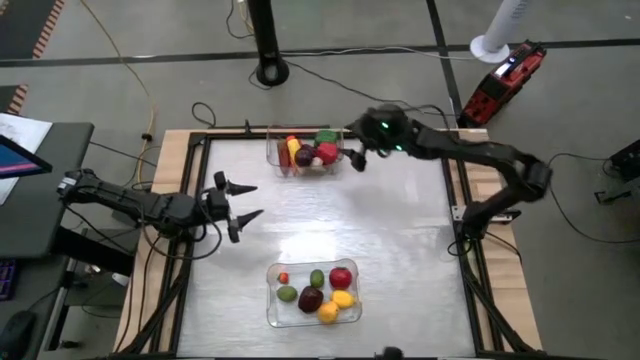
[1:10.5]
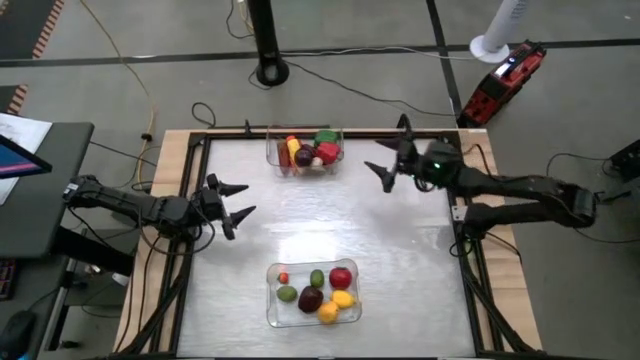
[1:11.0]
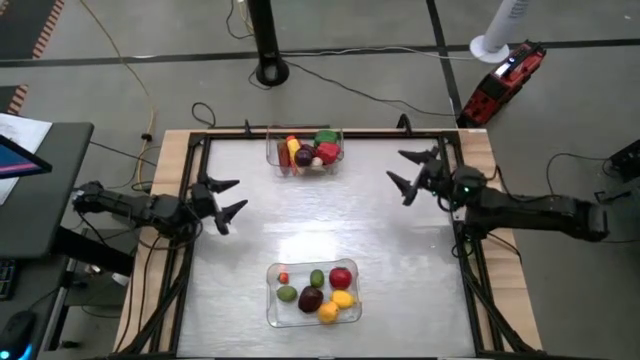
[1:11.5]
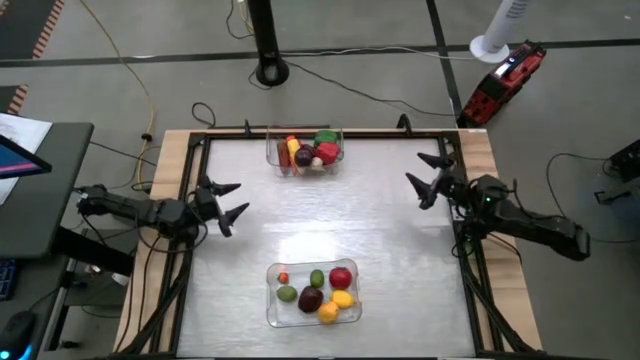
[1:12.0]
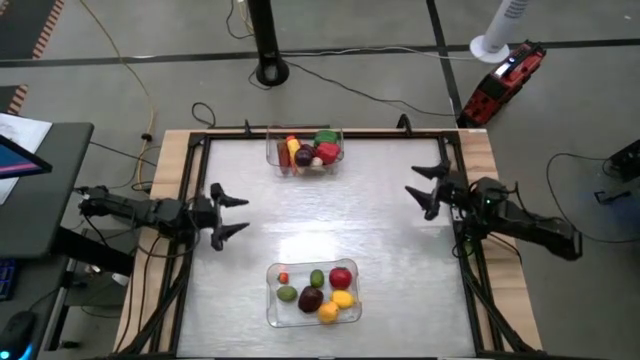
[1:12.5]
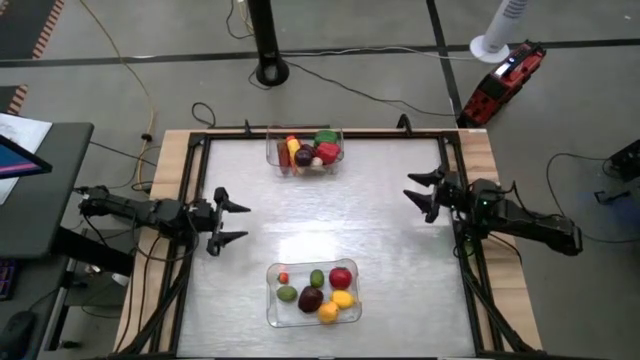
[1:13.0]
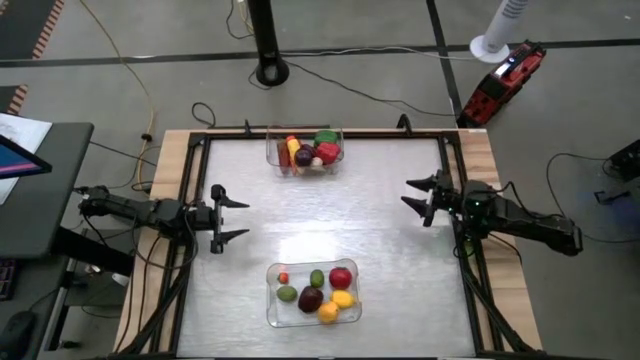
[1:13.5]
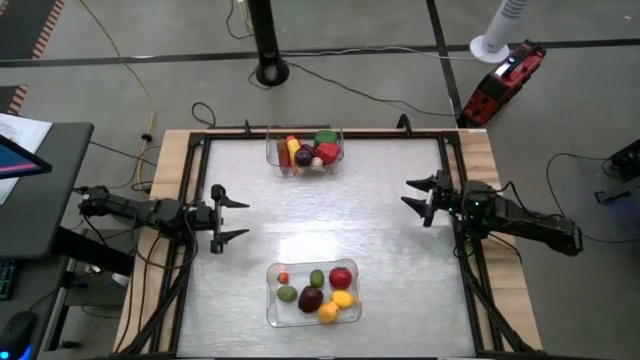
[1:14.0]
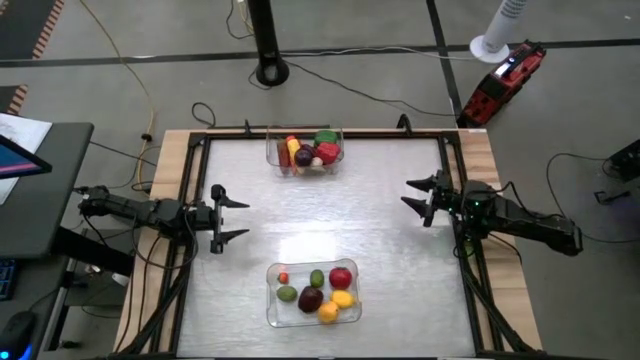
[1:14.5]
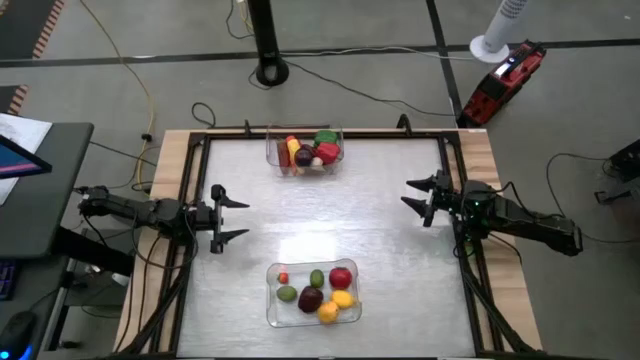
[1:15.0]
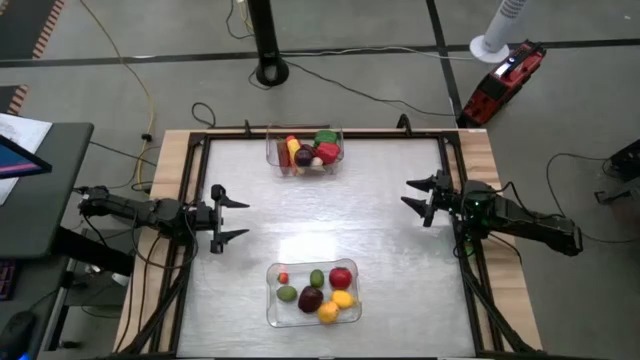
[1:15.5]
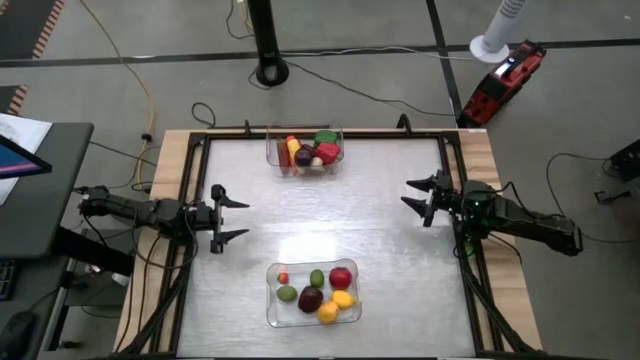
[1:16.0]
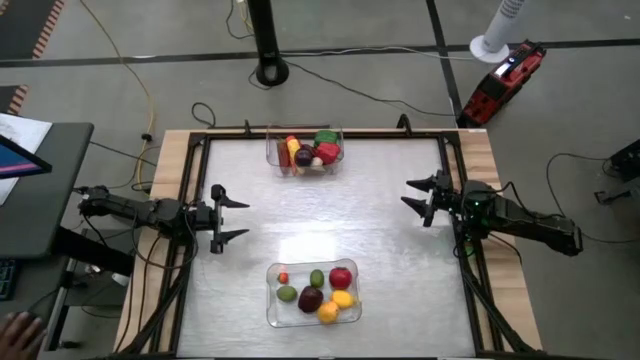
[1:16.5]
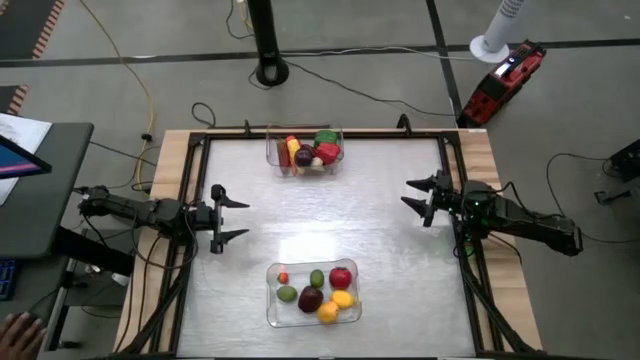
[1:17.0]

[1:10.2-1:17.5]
Task: Sort produce into baskets
Return to Home Position

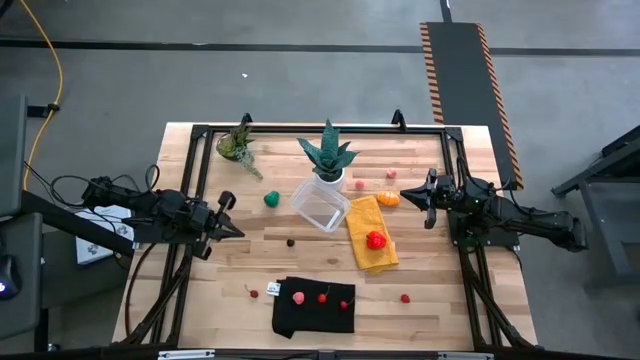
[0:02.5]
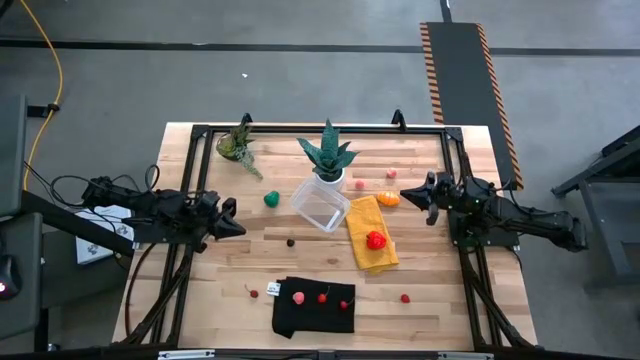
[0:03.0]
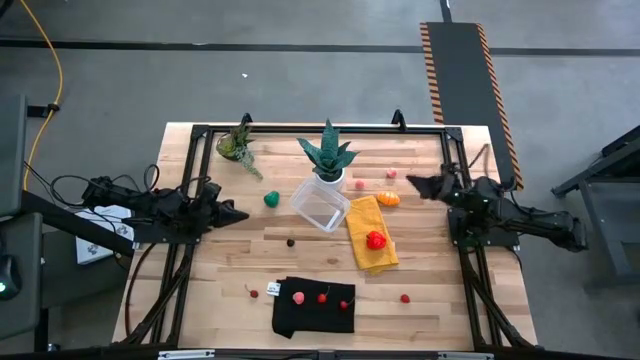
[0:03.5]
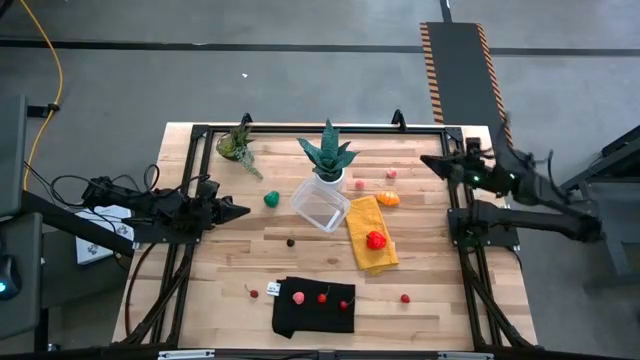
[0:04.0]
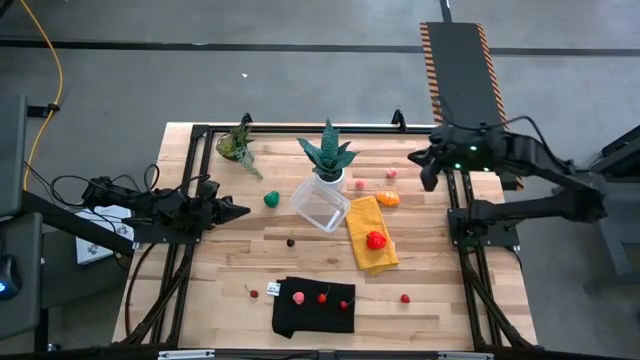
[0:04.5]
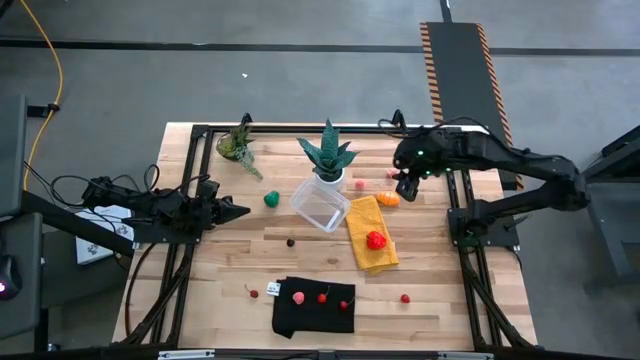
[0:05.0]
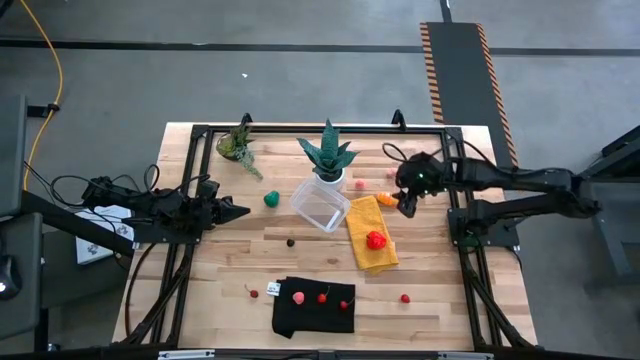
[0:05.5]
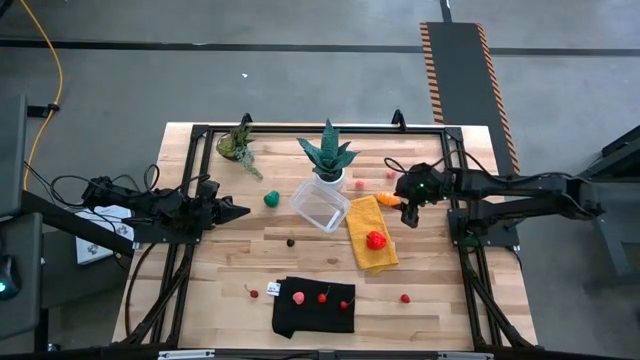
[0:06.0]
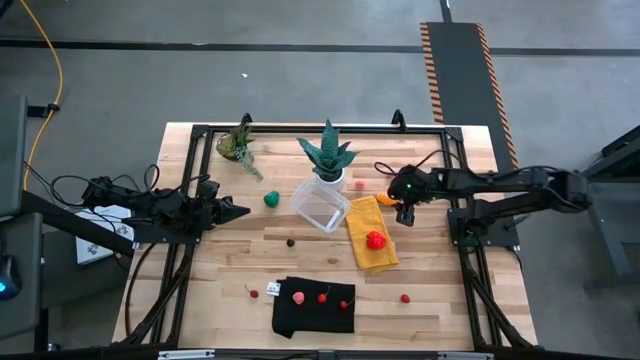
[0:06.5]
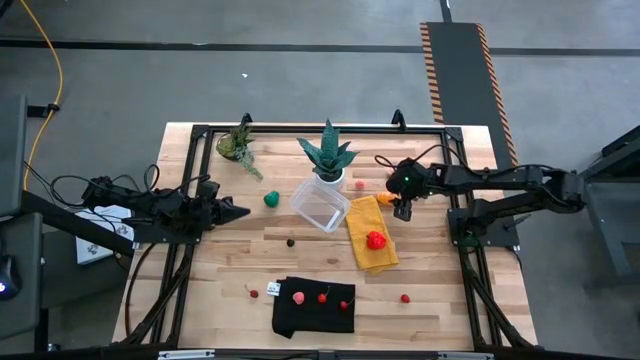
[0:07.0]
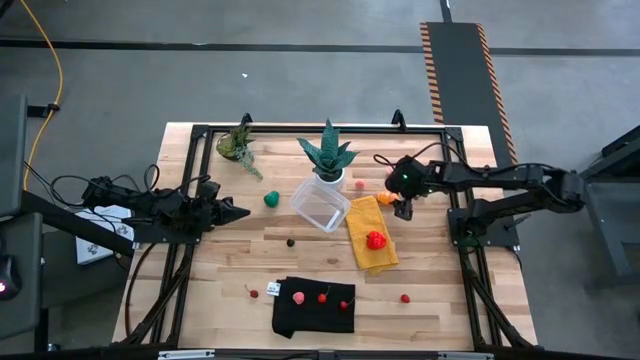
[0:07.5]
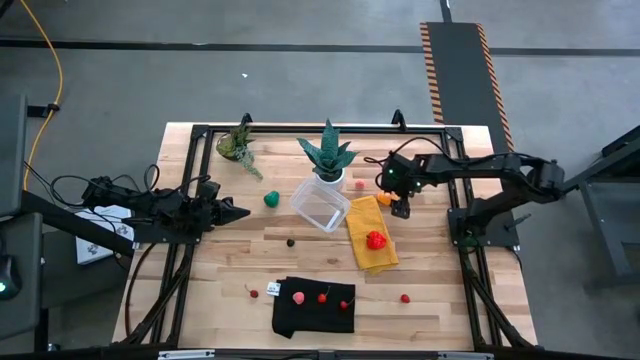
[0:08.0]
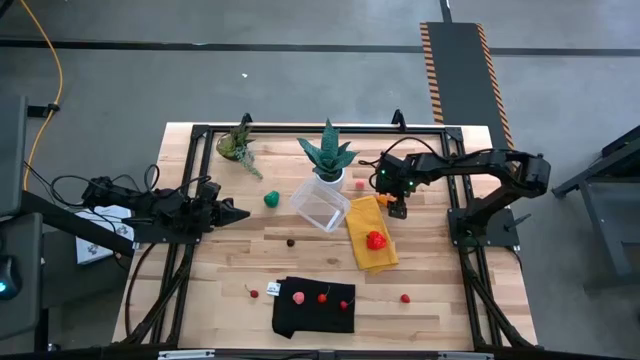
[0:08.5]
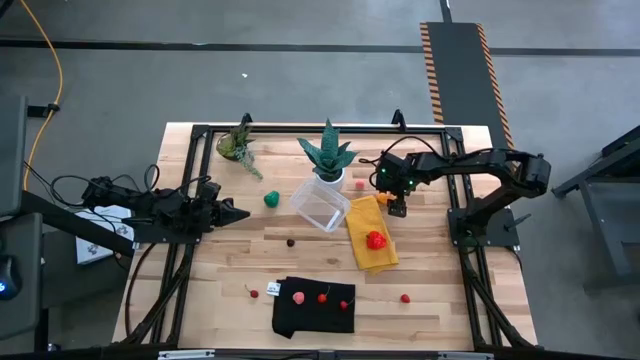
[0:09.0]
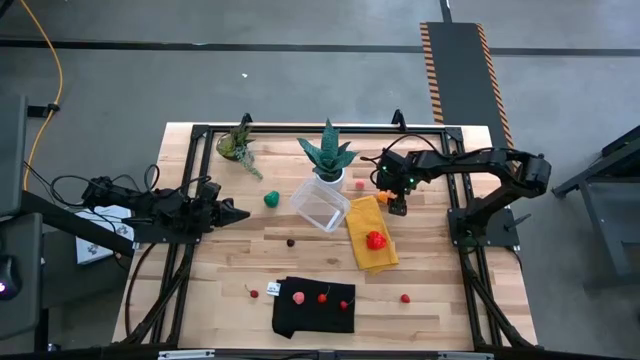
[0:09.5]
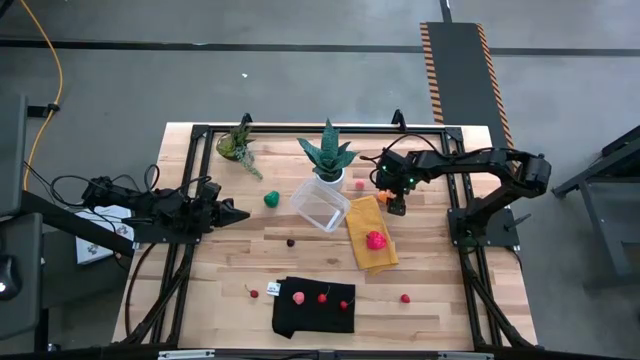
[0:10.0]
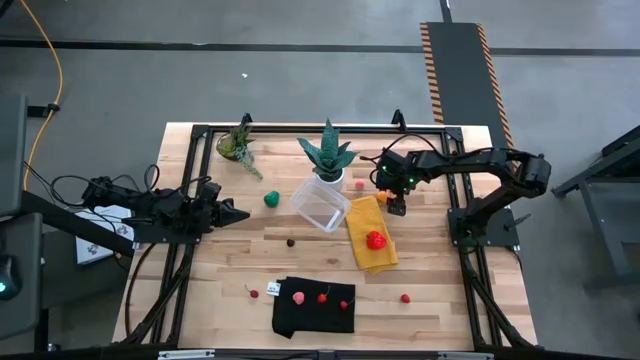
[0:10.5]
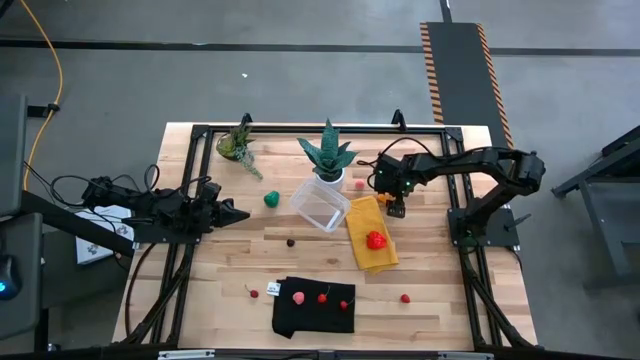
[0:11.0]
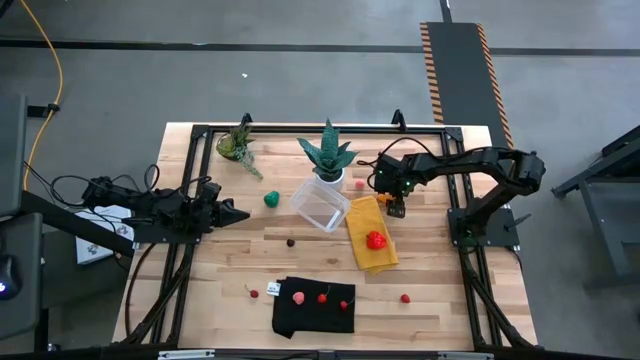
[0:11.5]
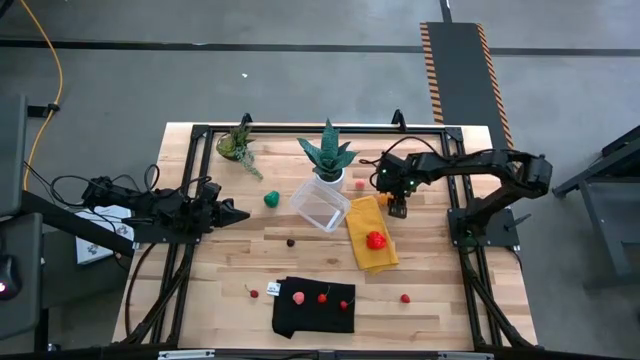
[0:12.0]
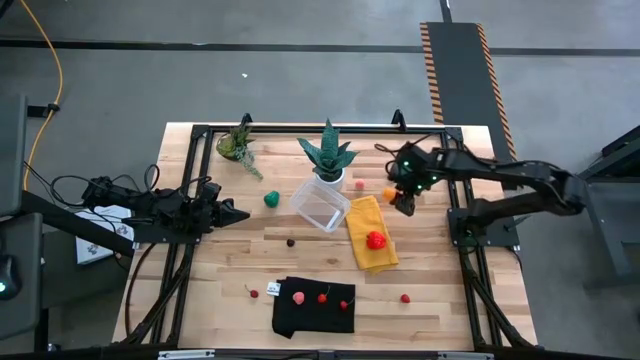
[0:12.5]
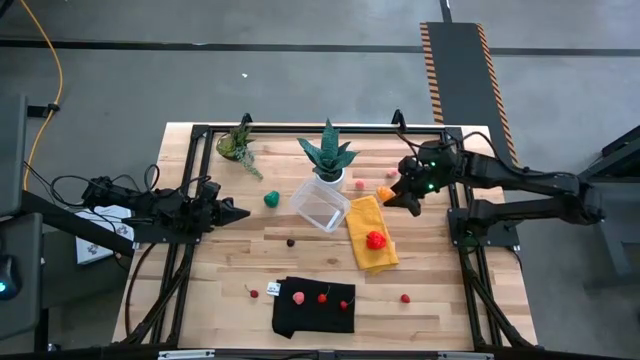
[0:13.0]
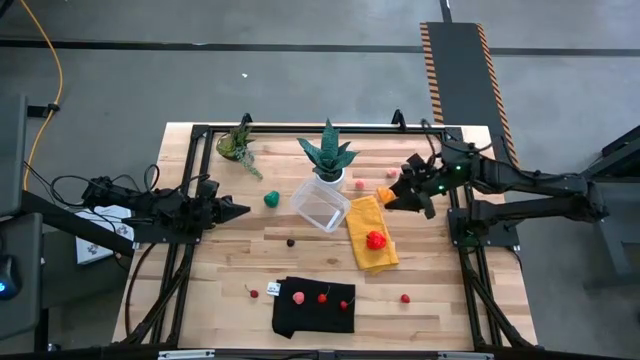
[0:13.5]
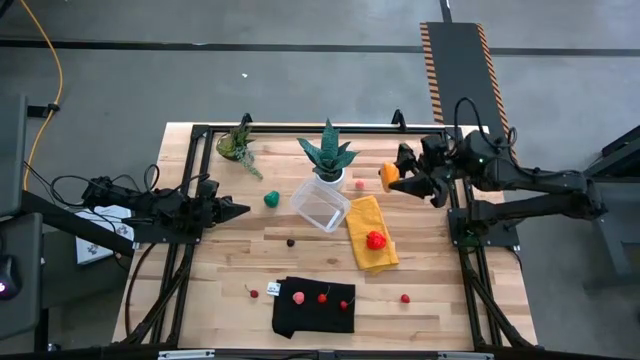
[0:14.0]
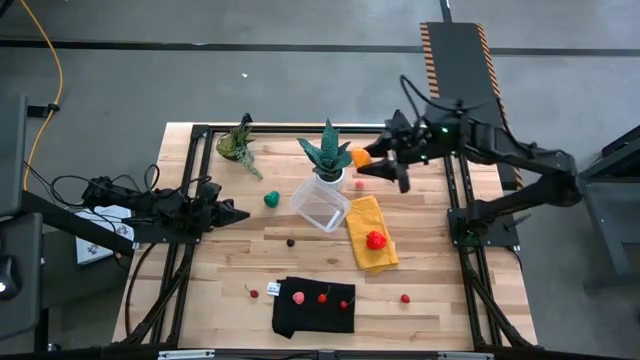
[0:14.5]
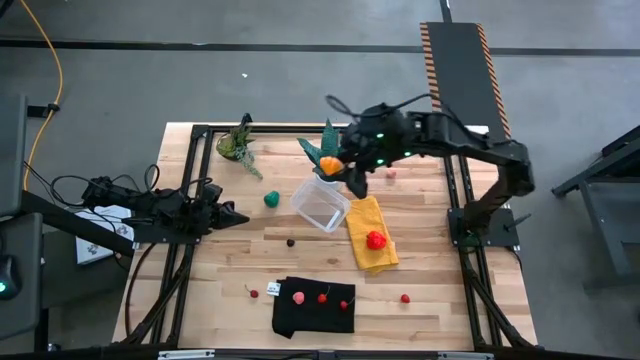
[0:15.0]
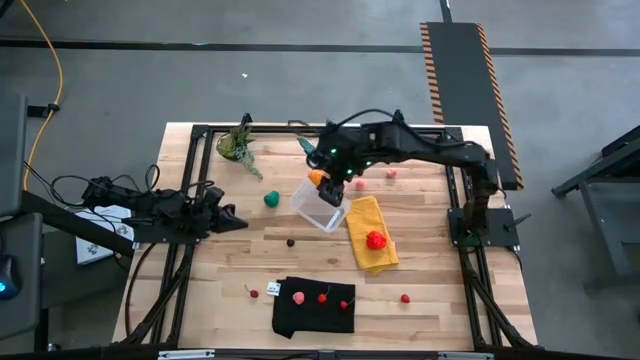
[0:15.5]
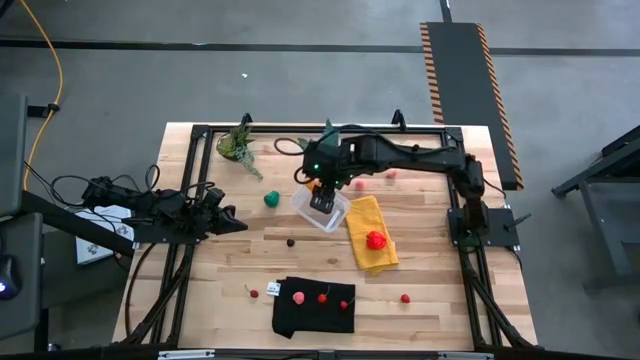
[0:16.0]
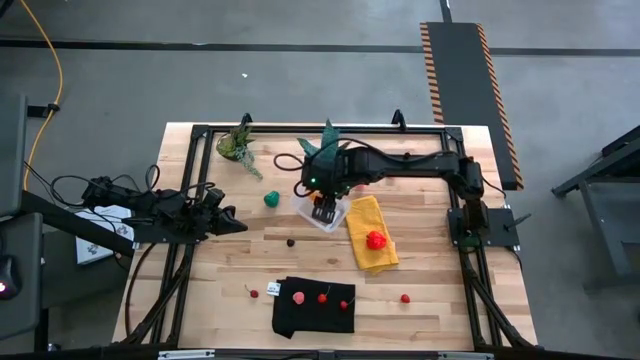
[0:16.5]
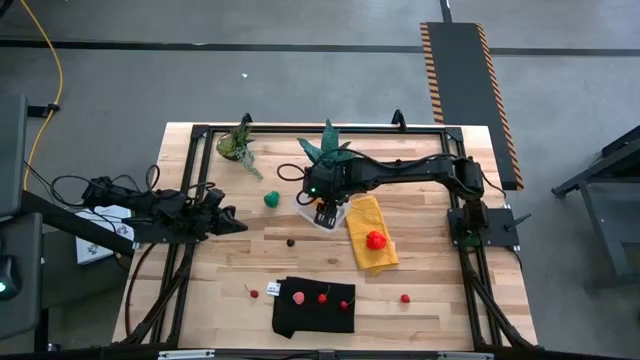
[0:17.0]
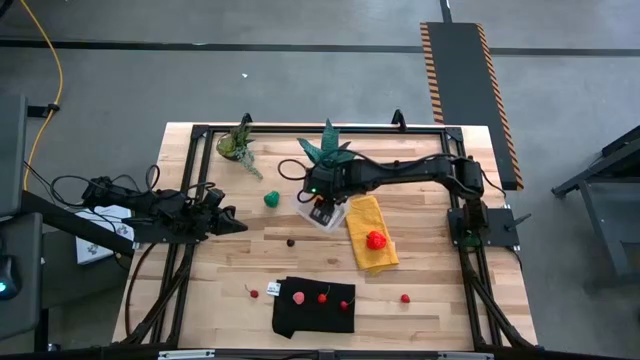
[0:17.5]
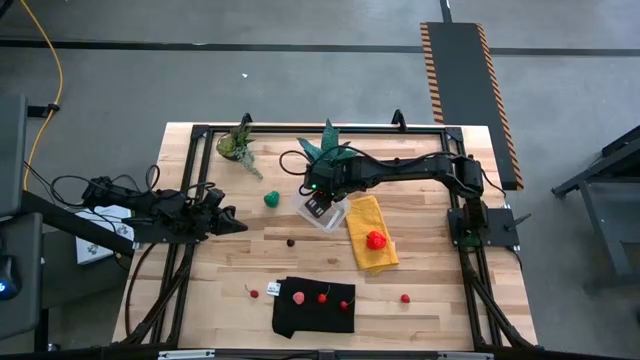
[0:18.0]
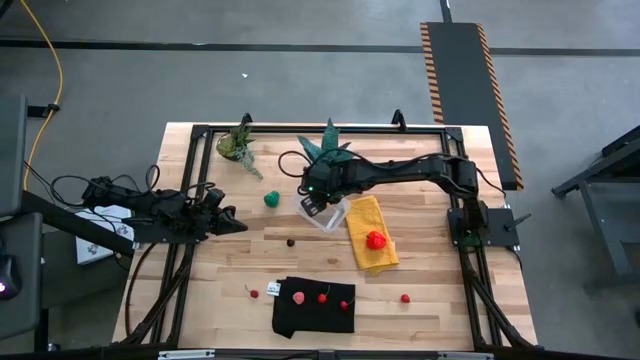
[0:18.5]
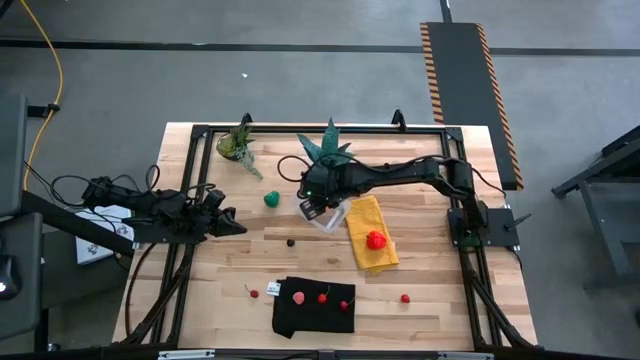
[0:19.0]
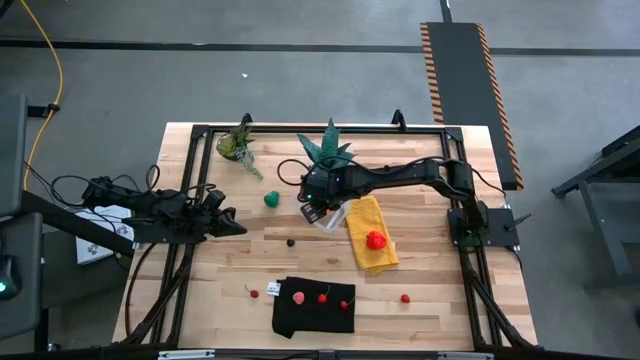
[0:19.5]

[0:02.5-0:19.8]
Task: Pick and placing Produce into tupperware
Put the yellow croissant into the transparent container
